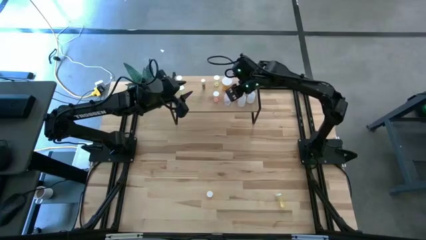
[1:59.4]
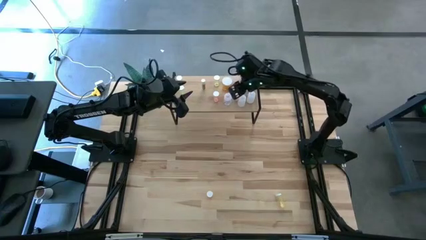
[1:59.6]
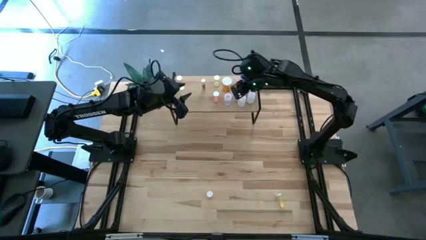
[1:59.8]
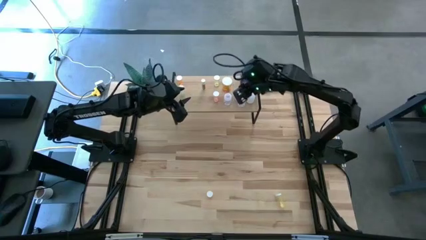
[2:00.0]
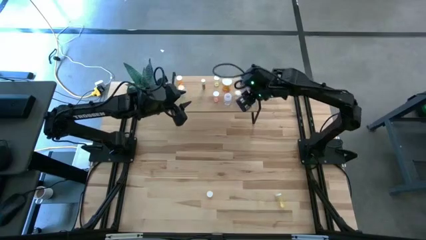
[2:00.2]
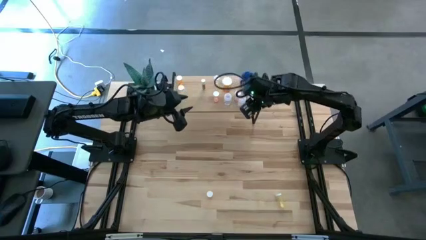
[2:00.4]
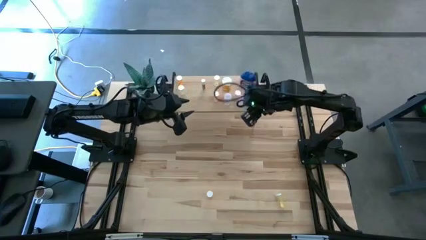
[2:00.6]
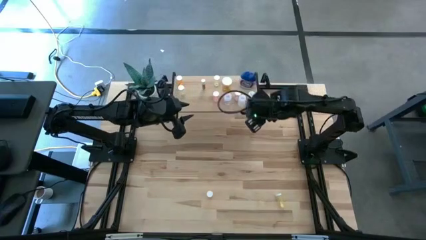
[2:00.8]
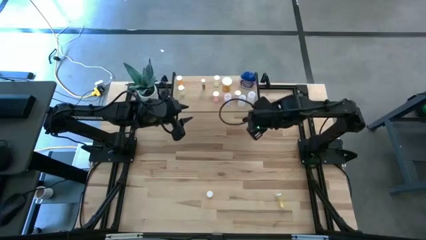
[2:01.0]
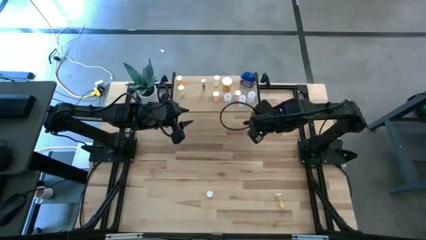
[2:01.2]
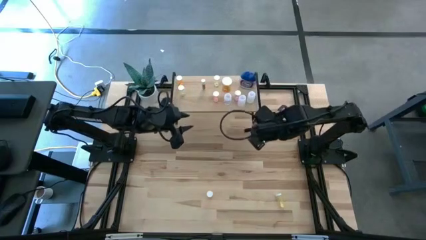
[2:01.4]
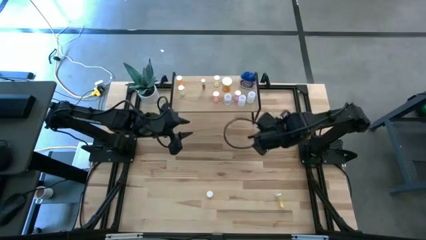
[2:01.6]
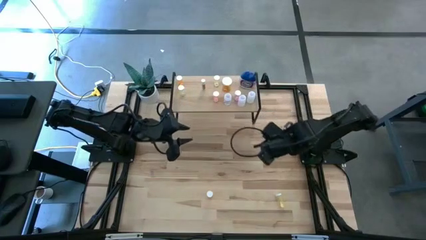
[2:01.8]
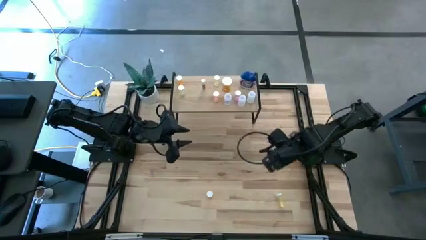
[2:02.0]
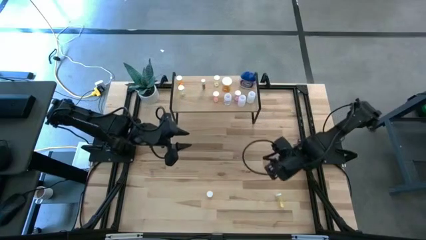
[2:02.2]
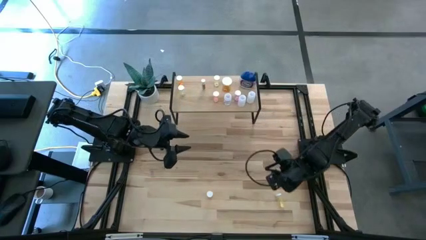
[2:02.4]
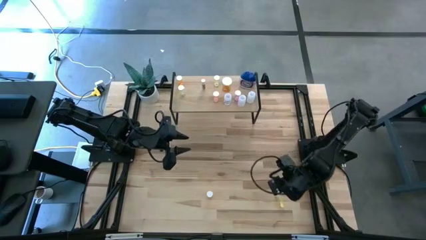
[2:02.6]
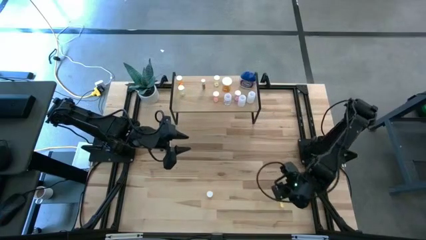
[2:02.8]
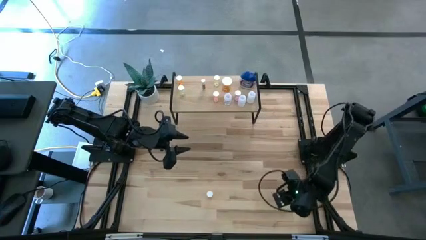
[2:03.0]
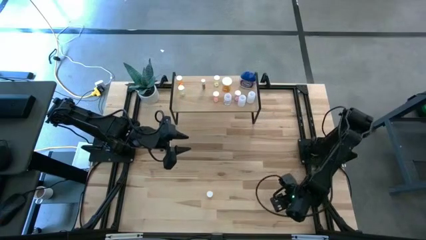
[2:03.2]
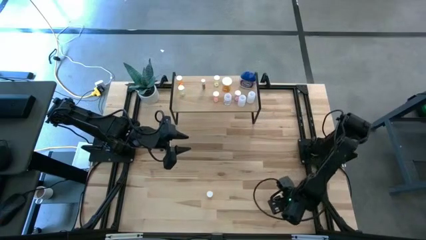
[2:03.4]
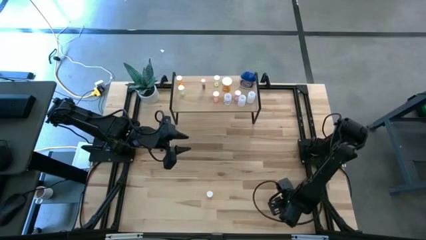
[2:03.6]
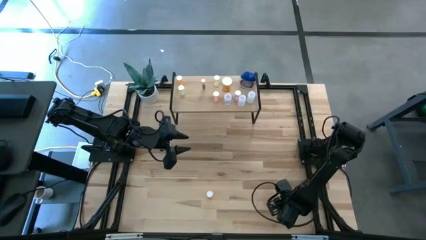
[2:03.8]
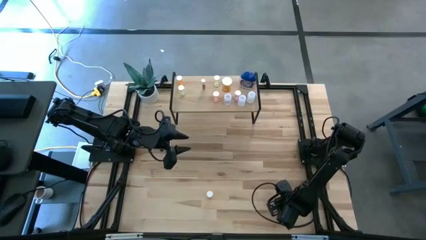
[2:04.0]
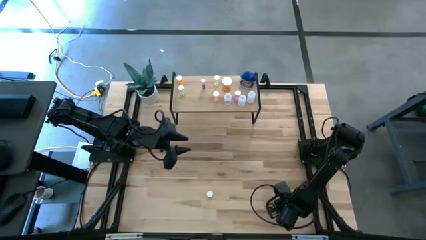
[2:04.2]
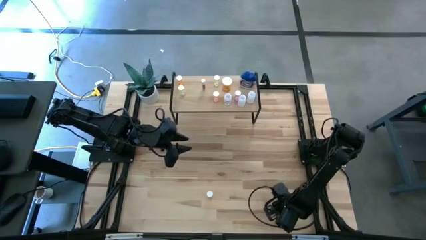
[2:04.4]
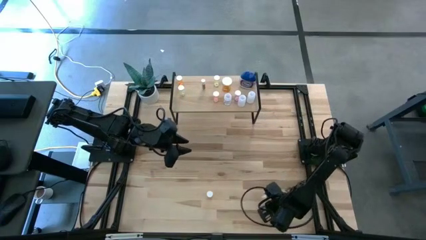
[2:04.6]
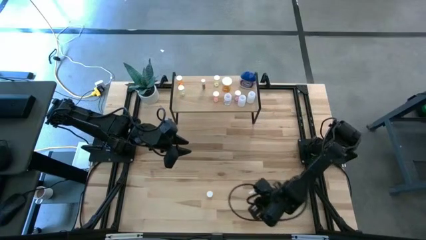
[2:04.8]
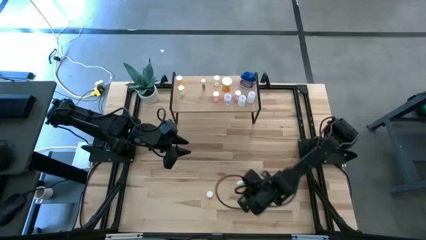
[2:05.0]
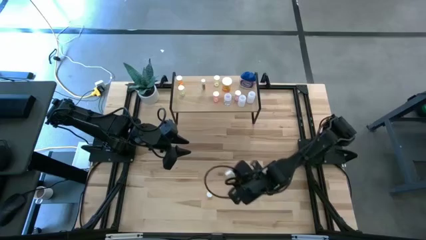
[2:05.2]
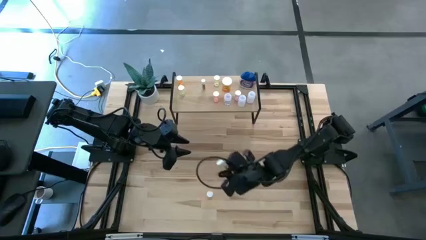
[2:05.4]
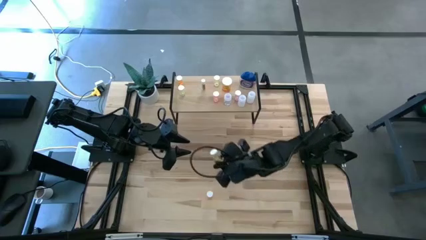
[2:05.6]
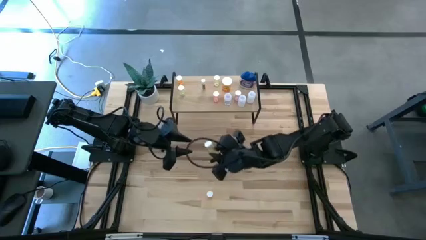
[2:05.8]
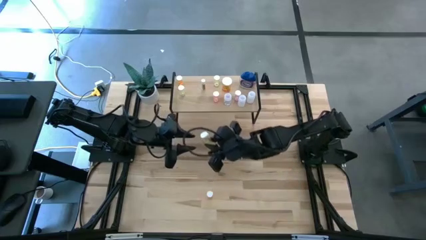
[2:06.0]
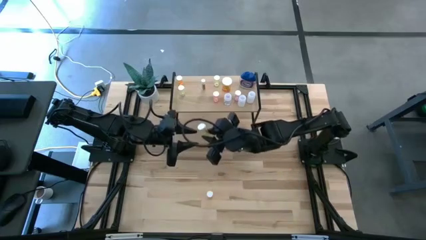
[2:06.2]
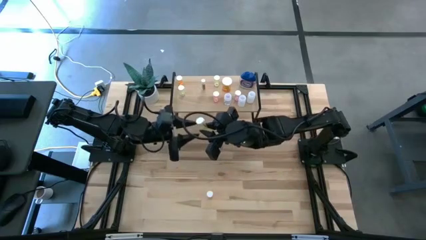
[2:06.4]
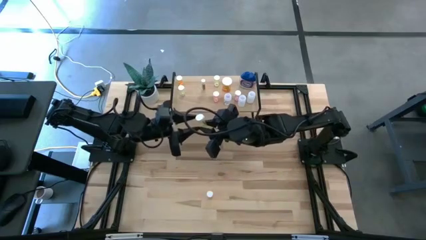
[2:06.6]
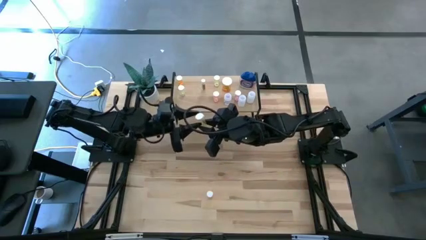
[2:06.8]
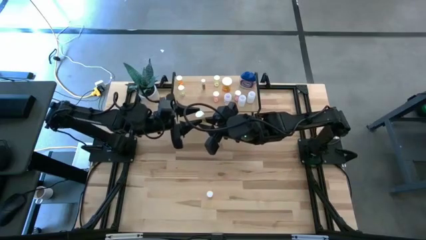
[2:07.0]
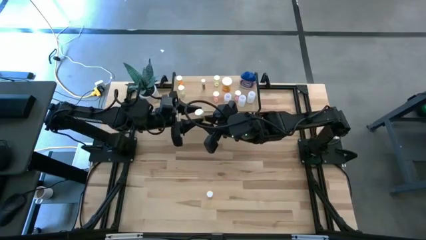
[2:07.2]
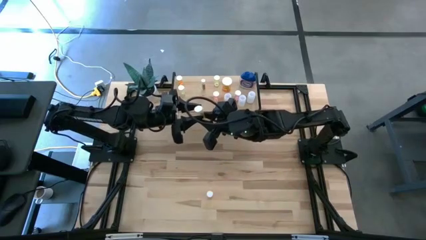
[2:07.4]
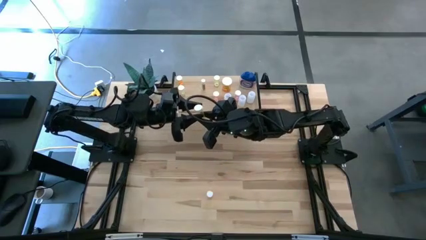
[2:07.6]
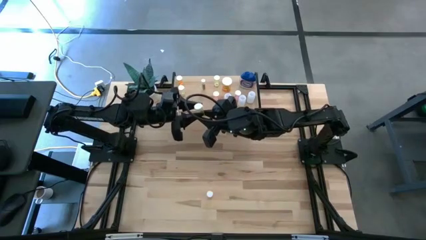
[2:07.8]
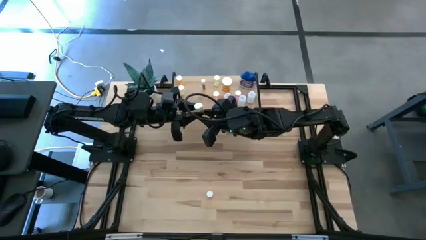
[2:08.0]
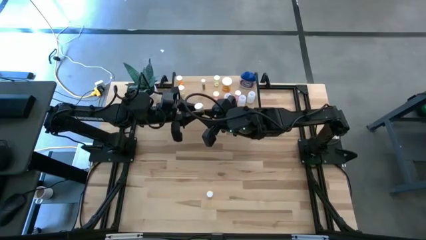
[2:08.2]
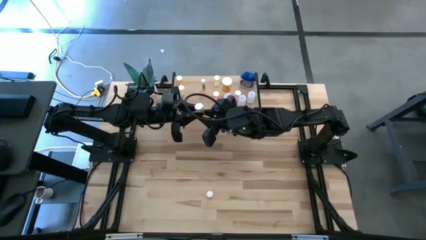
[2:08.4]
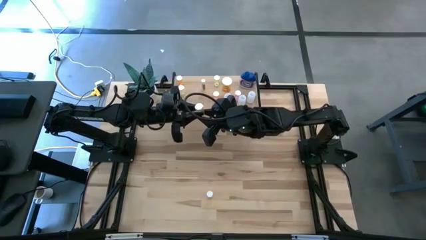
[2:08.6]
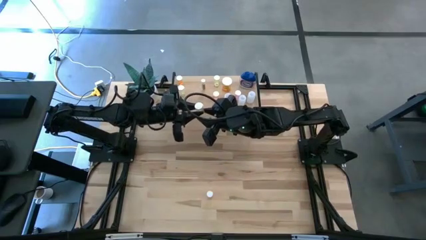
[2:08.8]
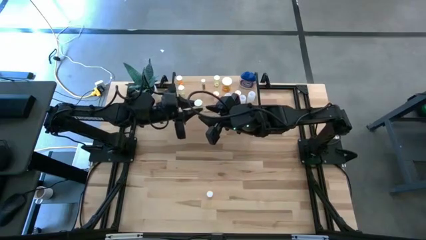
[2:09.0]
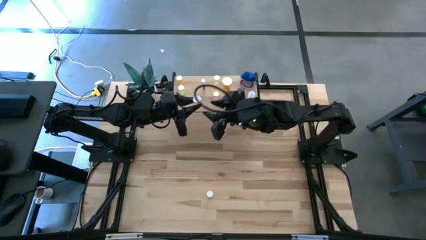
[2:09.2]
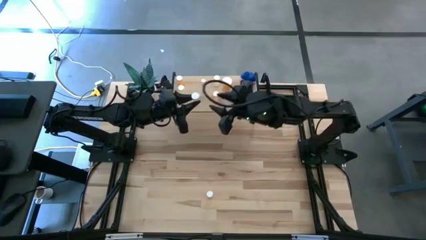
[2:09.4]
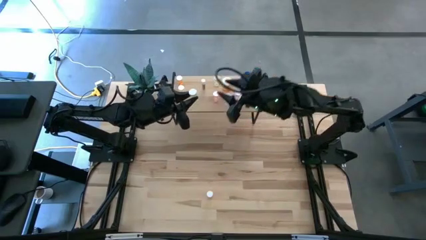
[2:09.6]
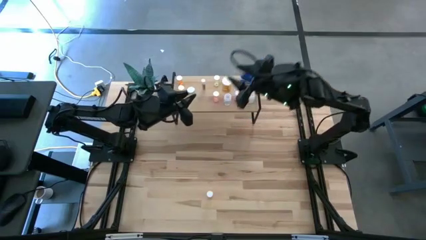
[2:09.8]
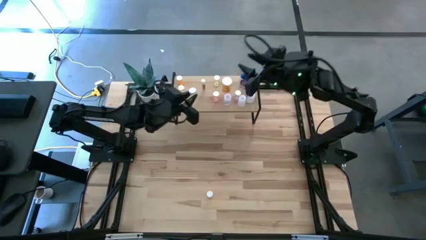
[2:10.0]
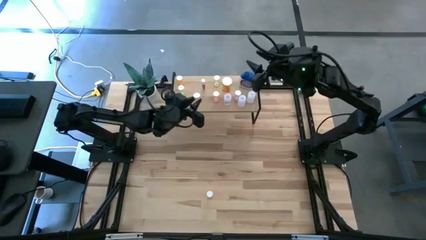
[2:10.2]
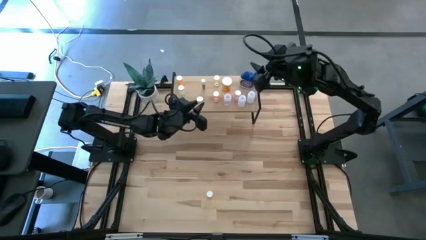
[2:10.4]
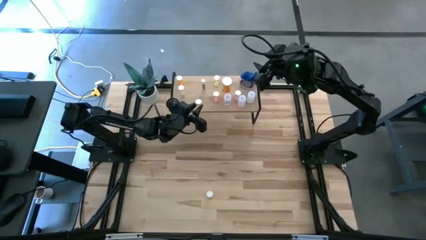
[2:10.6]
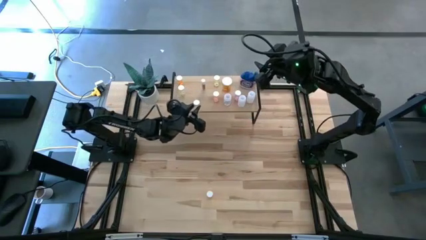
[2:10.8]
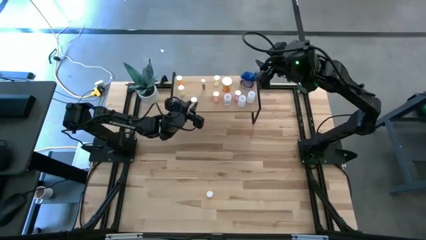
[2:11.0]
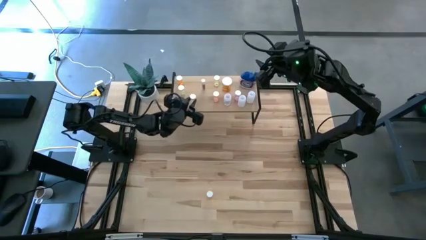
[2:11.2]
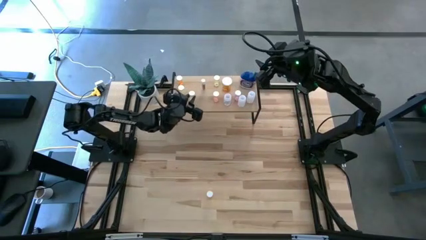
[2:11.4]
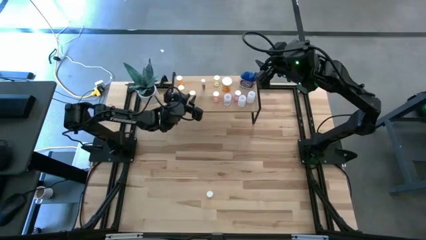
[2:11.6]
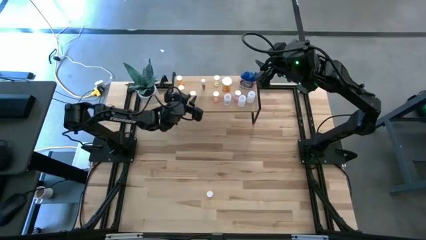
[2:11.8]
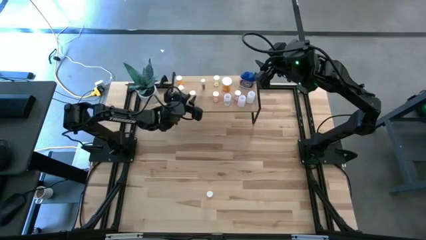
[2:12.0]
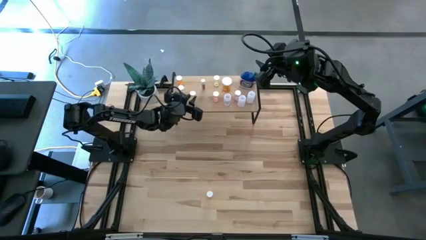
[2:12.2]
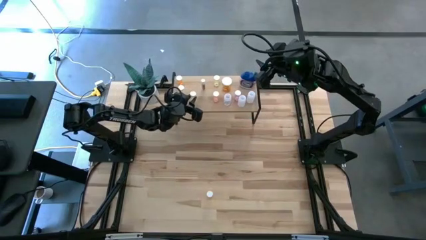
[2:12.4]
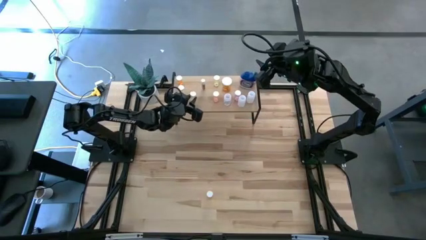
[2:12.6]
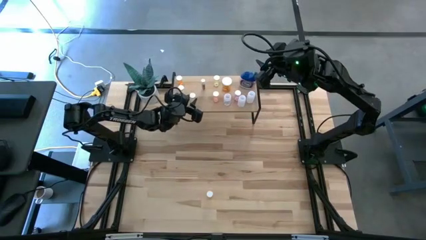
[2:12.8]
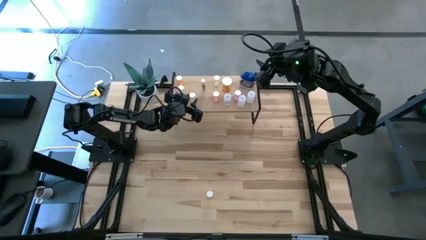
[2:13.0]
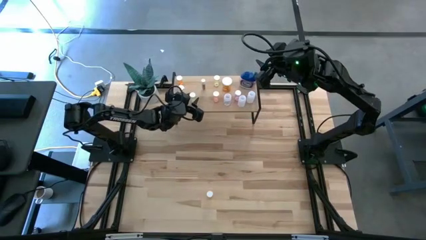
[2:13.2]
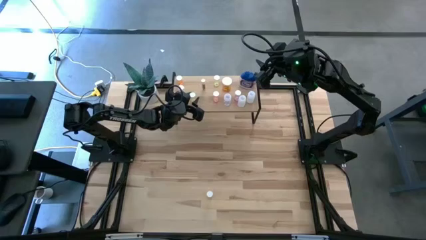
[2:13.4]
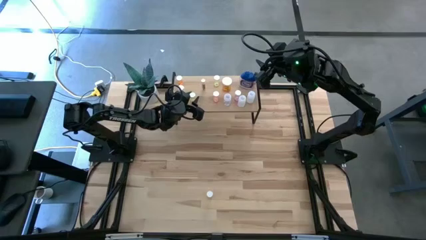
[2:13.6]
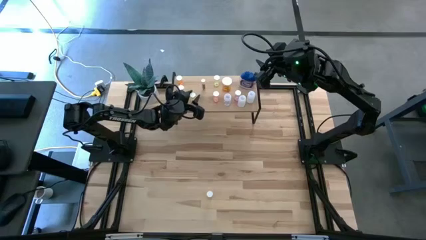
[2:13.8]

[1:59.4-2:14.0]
Task: Pick and place medicine bottles onto shelf by color
Put the yellow pill bottle on the shelf

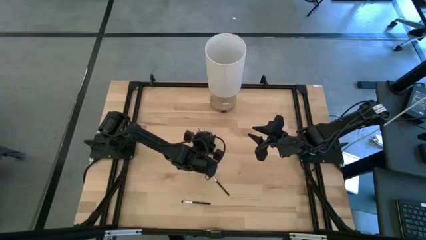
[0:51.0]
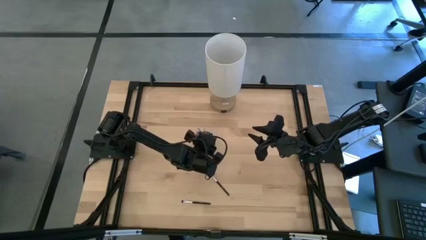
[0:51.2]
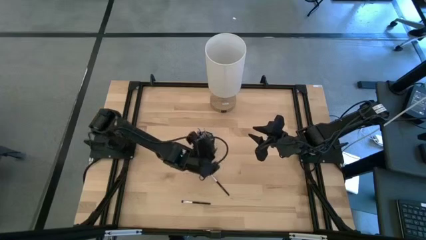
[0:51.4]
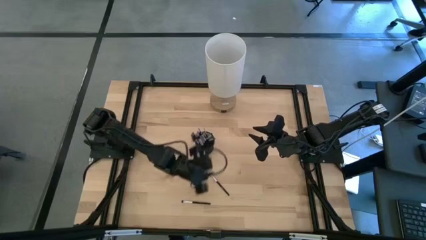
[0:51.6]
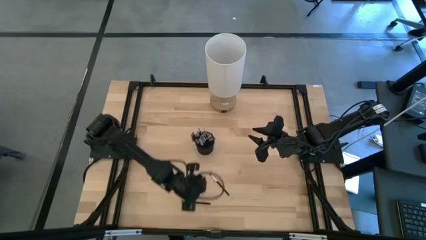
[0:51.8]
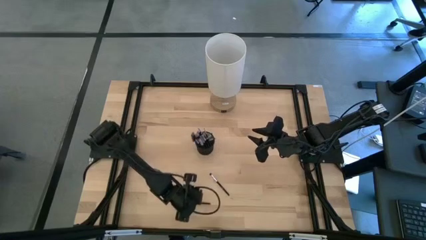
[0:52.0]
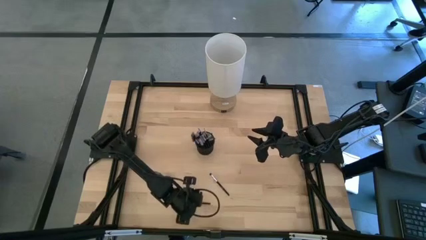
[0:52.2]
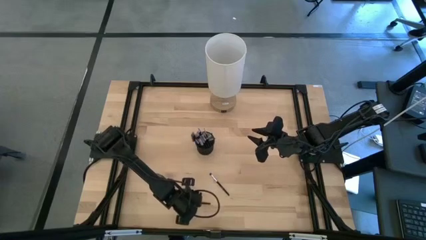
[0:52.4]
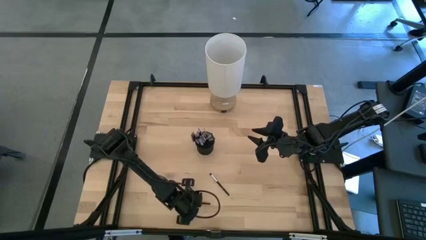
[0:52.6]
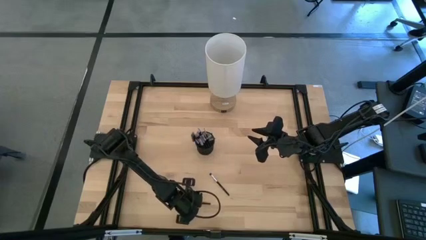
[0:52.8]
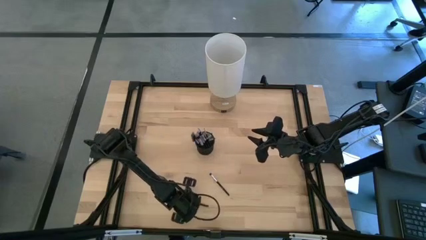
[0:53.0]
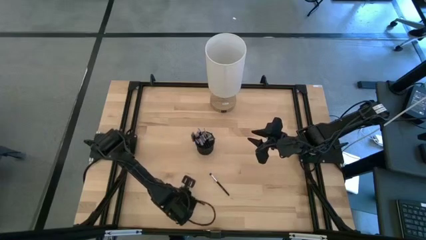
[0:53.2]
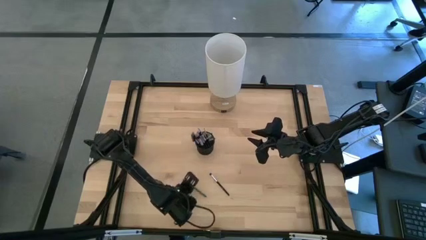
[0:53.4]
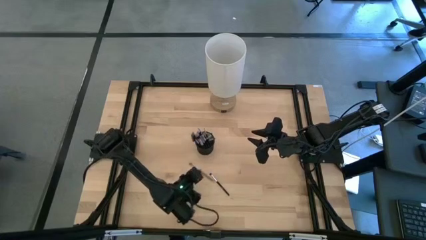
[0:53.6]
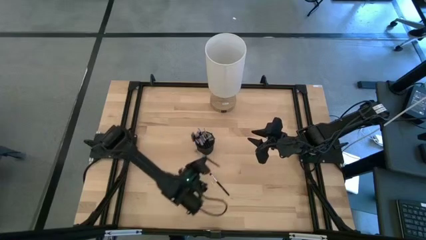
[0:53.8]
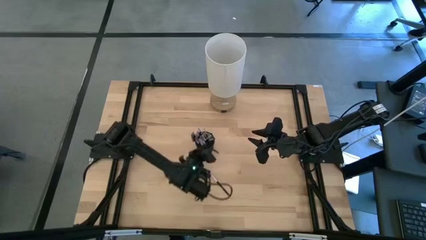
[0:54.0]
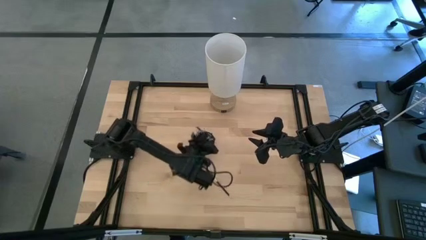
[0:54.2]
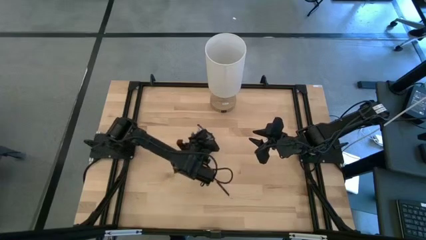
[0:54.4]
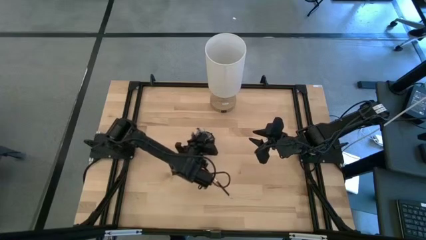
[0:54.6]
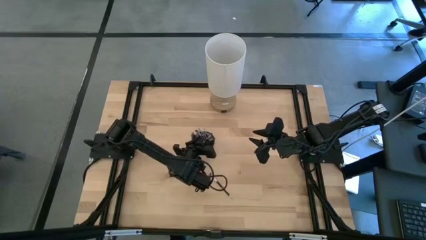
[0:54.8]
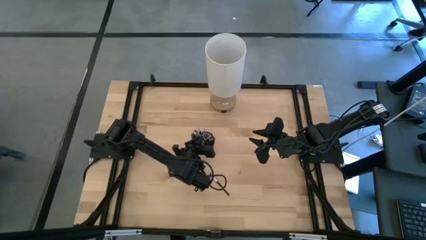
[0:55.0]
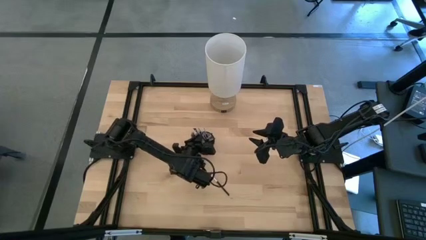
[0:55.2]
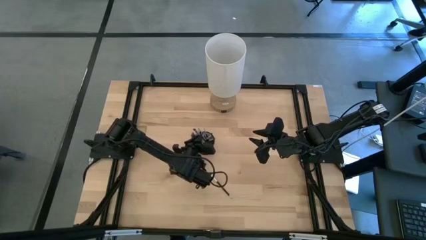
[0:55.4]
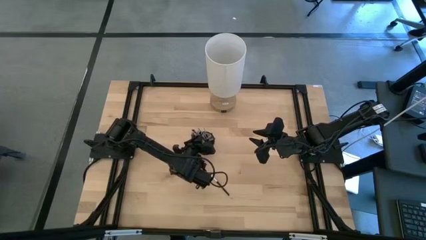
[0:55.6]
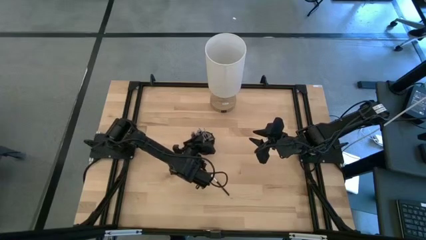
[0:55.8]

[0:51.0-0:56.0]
Task: Put items in baskets/containers
Put the eyeshadow brush into the holder
